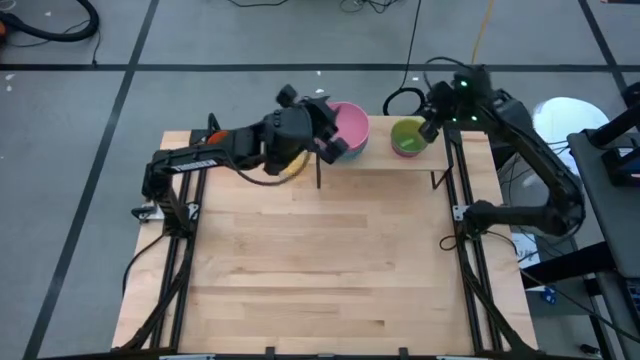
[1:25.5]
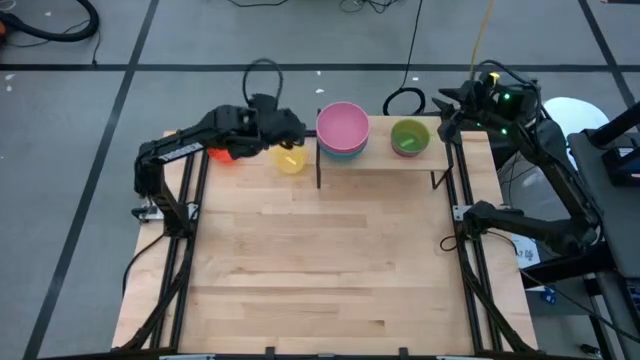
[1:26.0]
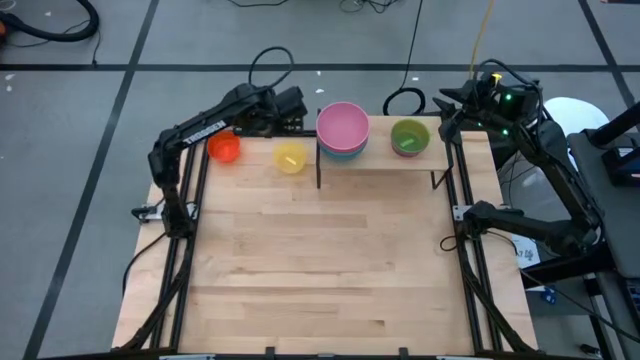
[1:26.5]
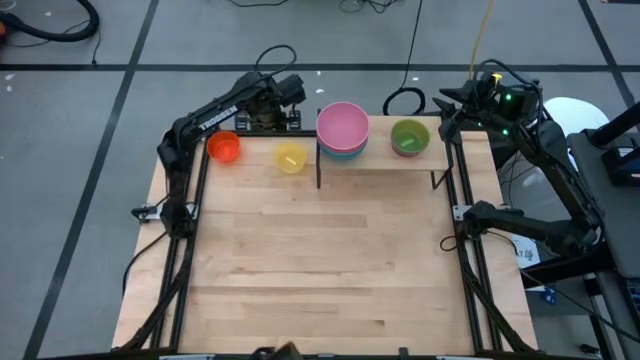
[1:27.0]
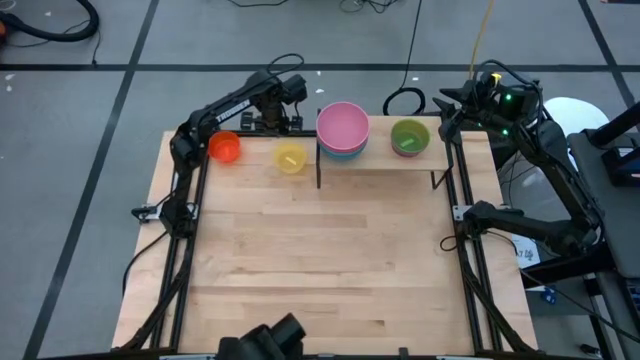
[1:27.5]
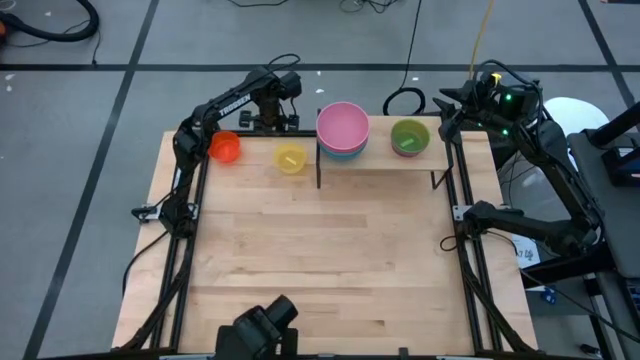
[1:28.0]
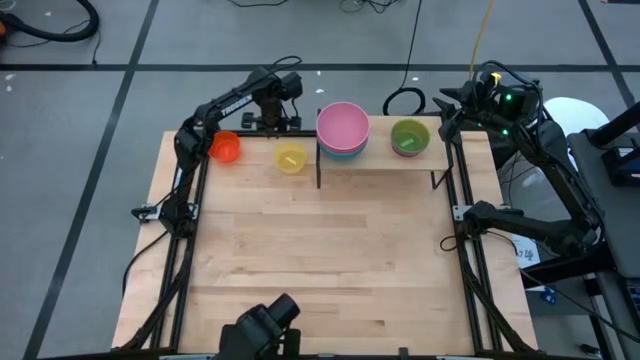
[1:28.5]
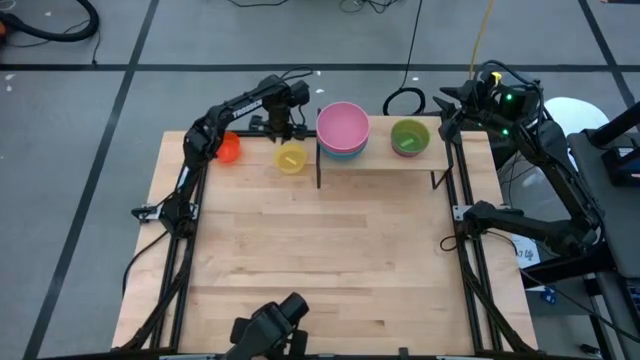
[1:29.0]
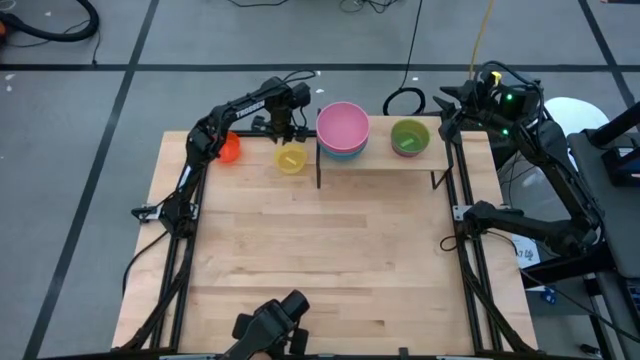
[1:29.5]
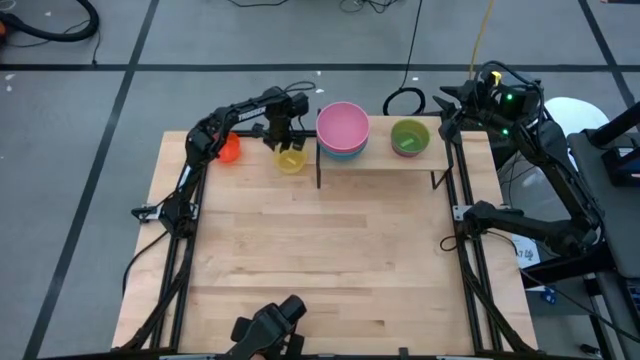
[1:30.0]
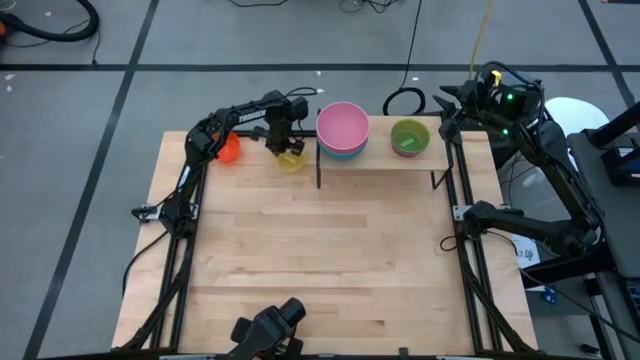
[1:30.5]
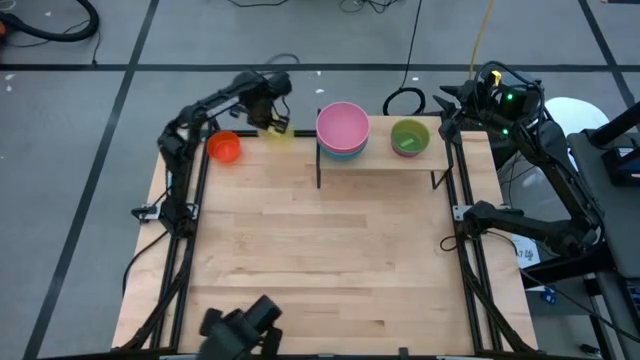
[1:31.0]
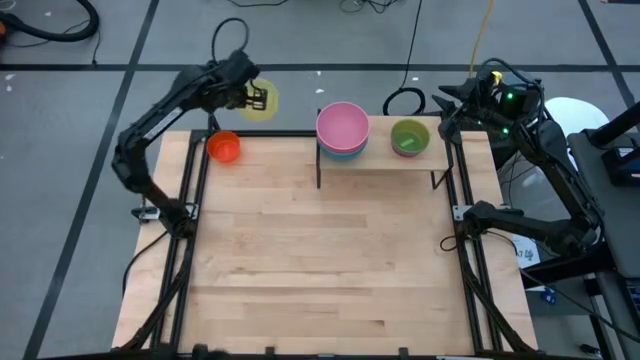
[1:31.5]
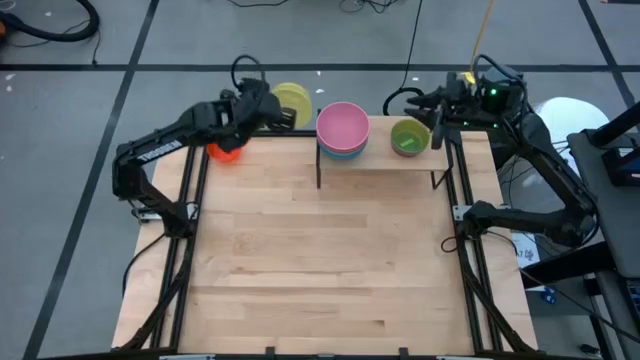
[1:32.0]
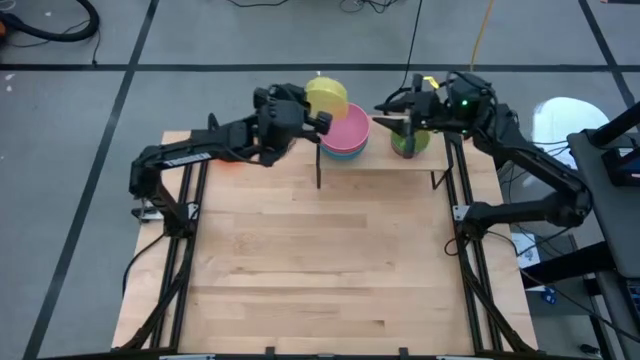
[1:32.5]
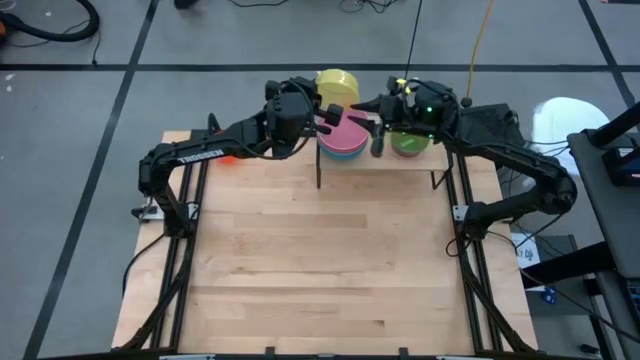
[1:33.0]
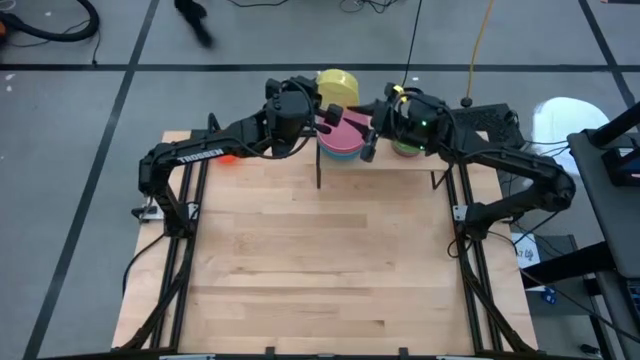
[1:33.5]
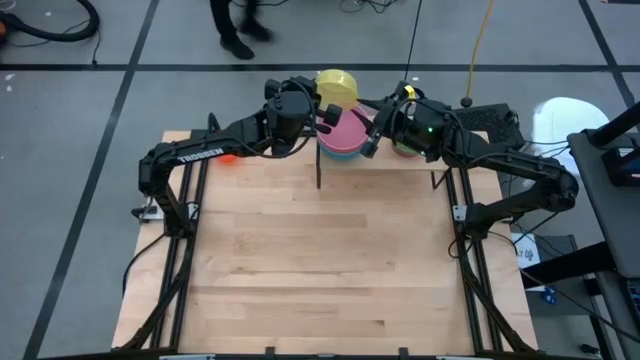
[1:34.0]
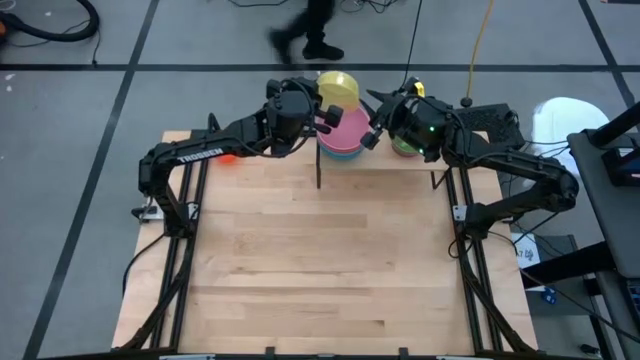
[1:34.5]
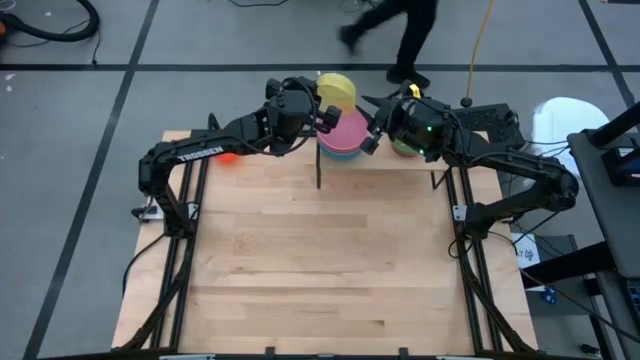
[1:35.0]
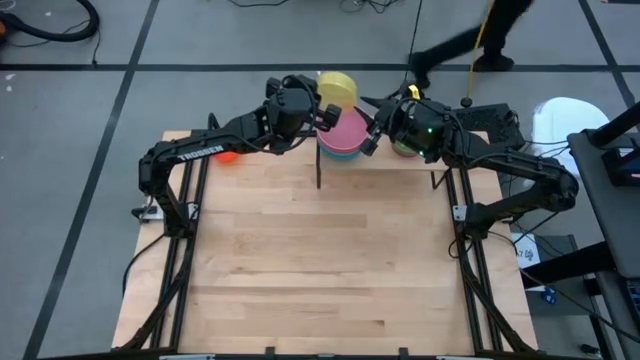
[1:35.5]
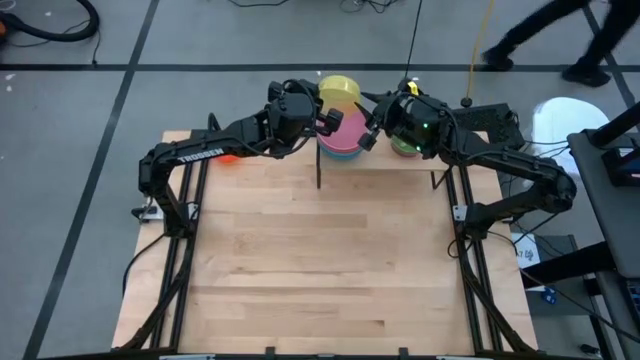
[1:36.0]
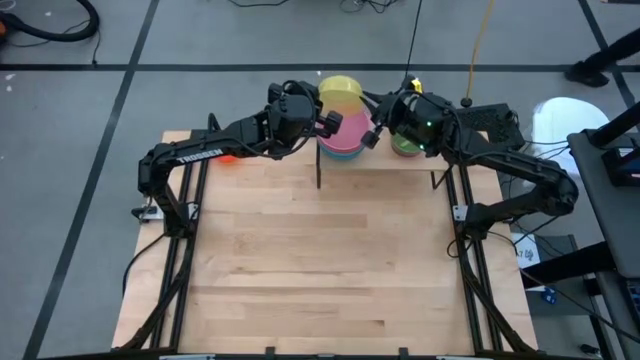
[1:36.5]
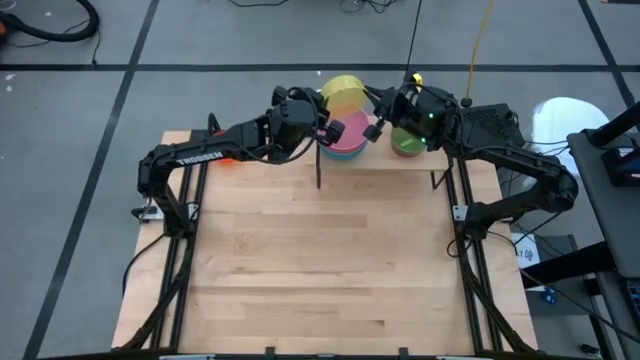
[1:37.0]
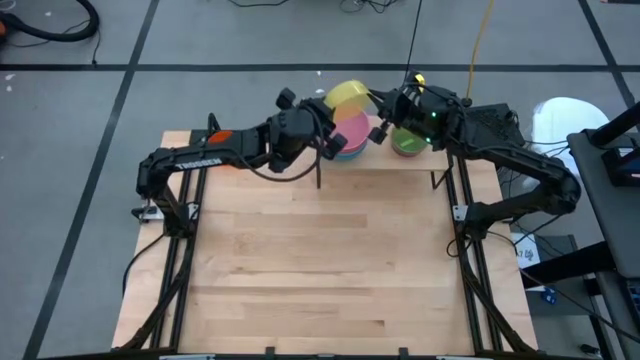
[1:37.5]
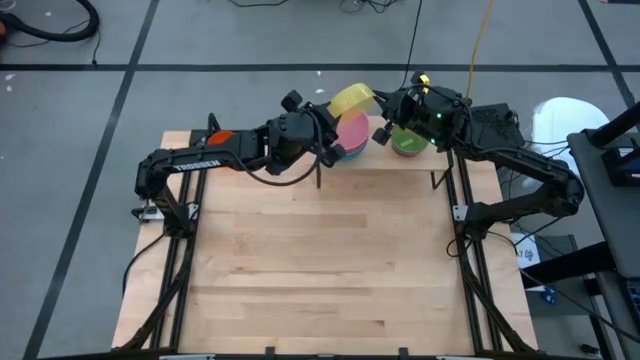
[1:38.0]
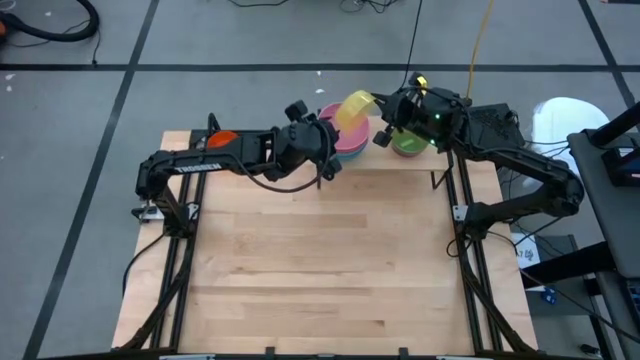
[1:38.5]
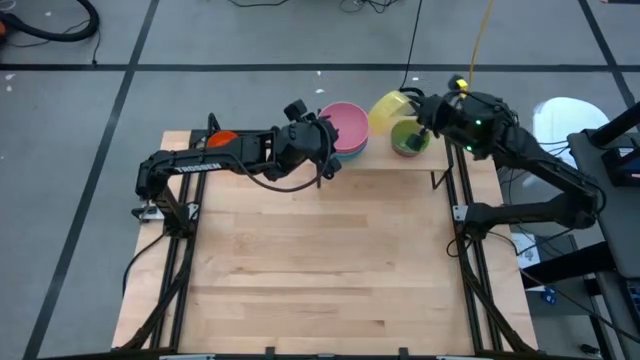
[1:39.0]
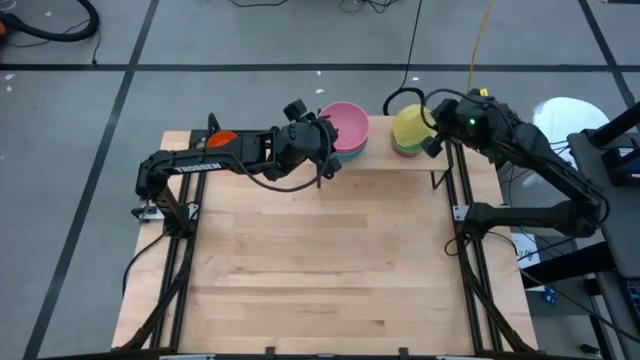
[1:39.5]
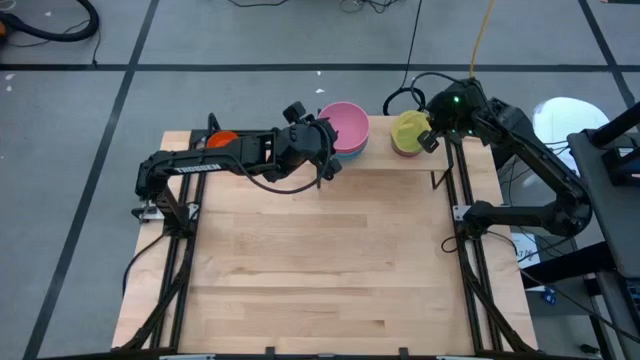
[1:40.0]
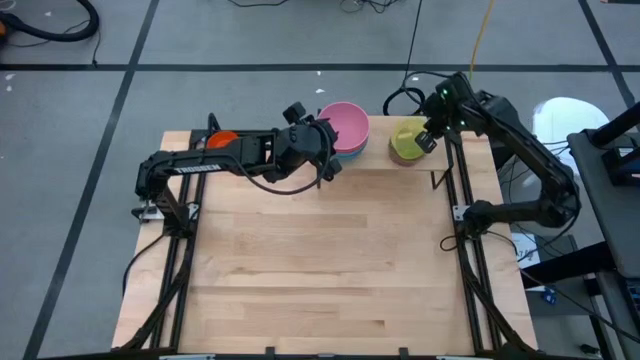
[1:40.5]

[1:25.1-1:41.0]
Task: Place and stack bowls onto a shelf
Stack the yellow bowl on top of the green bowl on the shelf

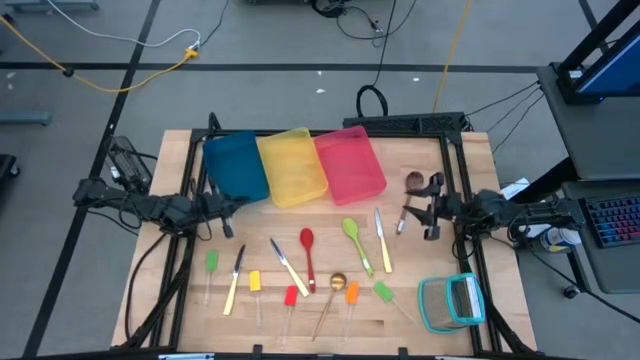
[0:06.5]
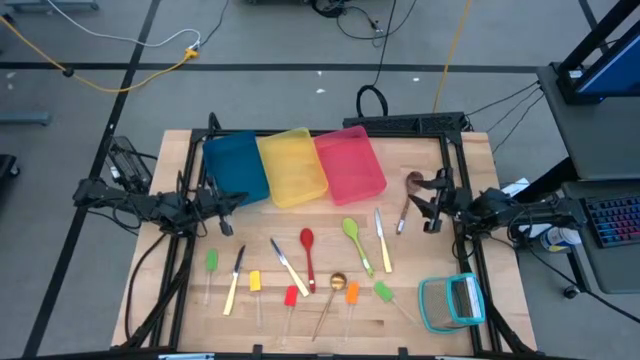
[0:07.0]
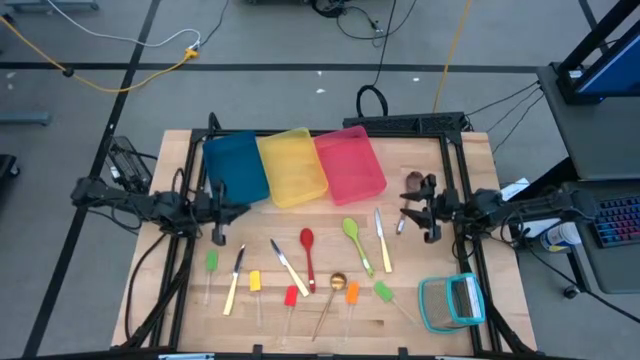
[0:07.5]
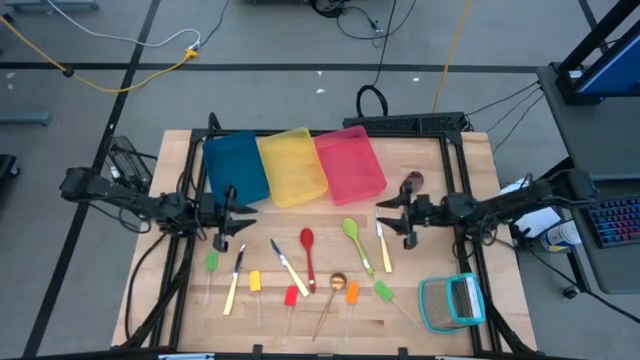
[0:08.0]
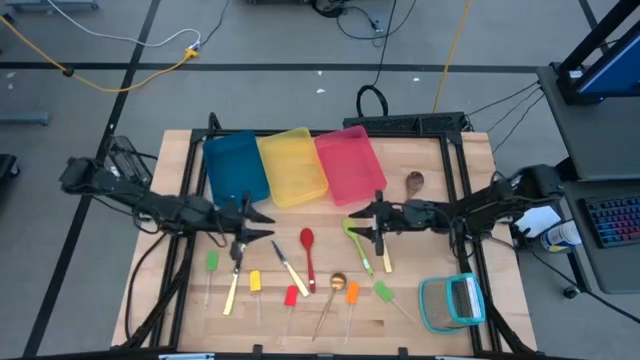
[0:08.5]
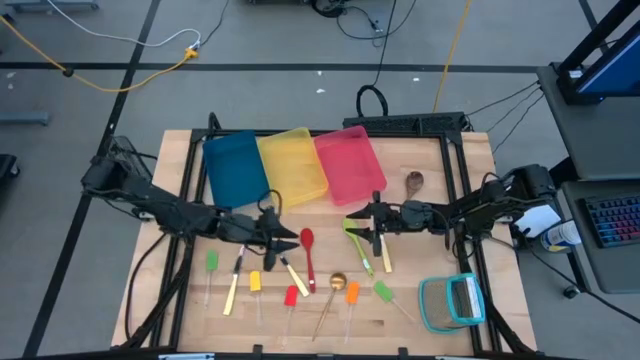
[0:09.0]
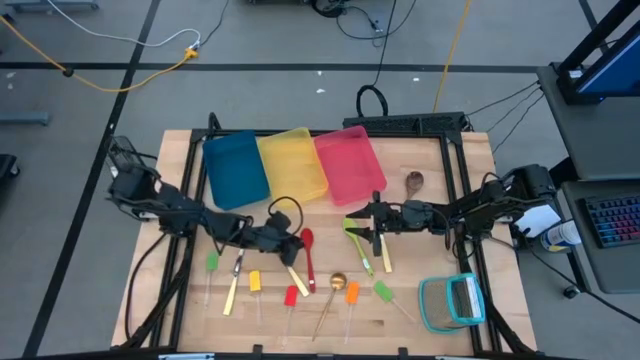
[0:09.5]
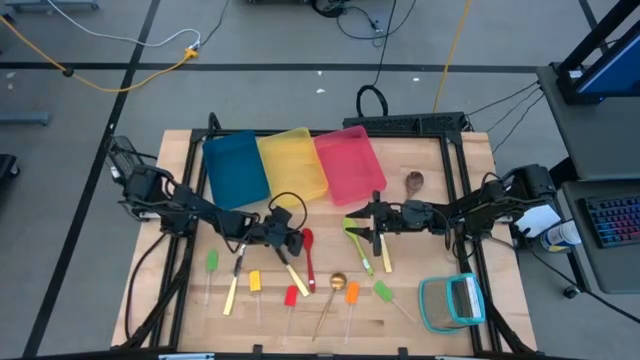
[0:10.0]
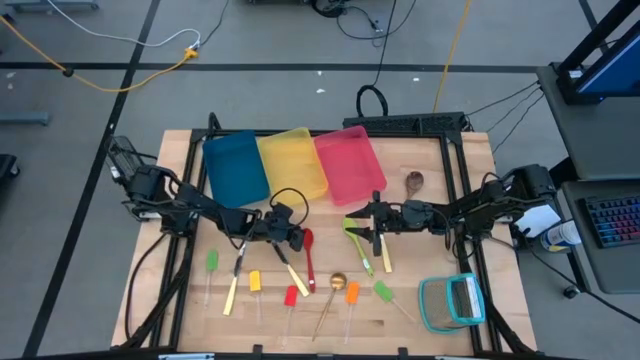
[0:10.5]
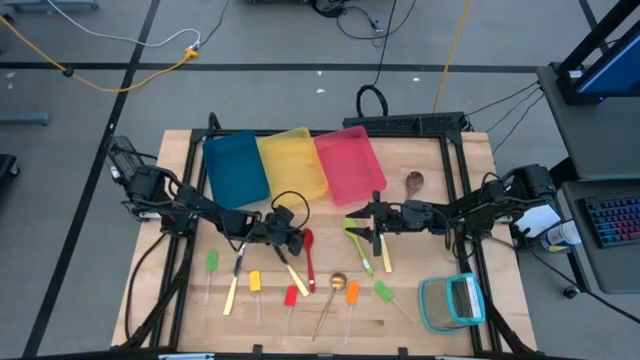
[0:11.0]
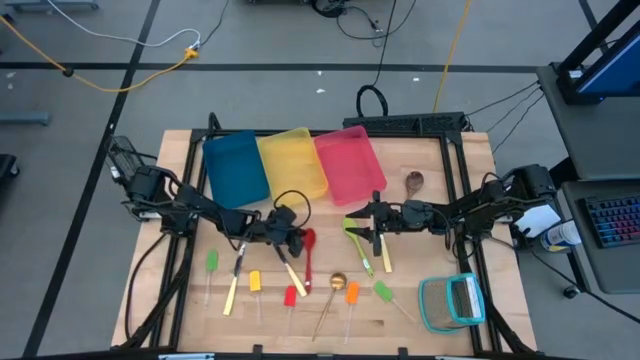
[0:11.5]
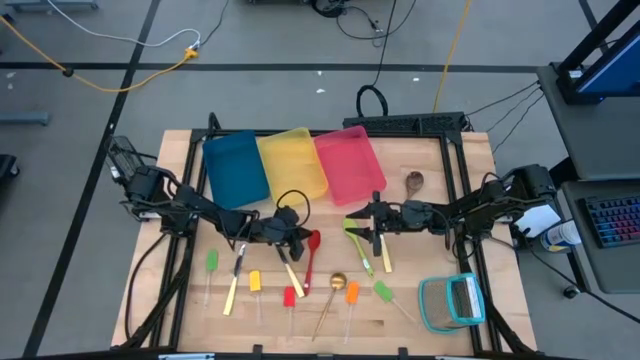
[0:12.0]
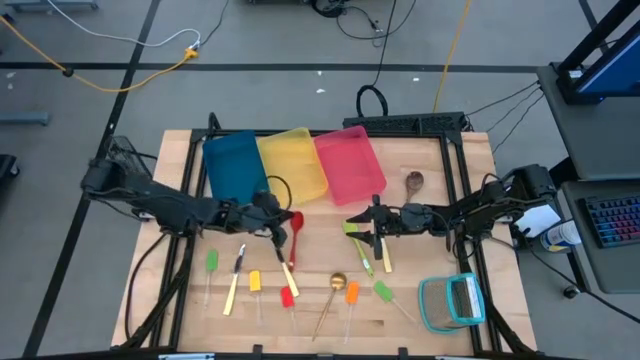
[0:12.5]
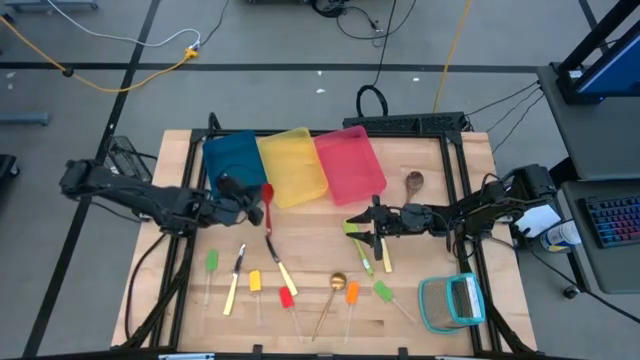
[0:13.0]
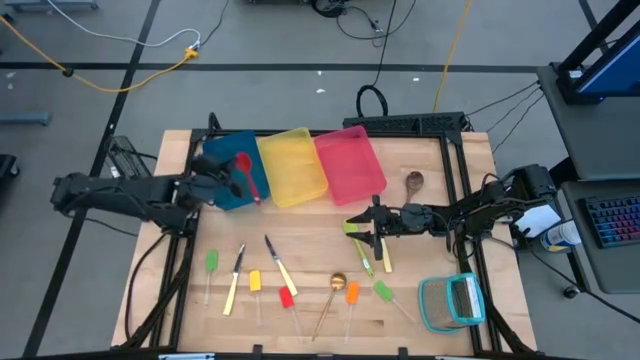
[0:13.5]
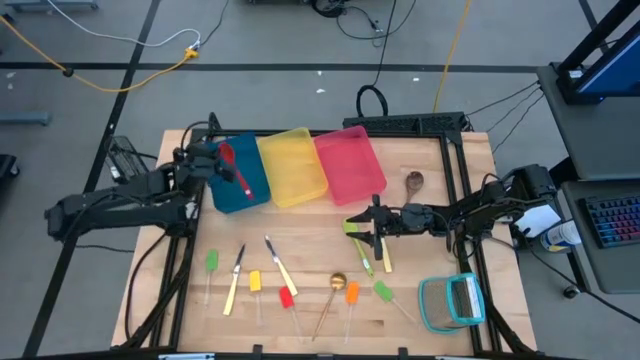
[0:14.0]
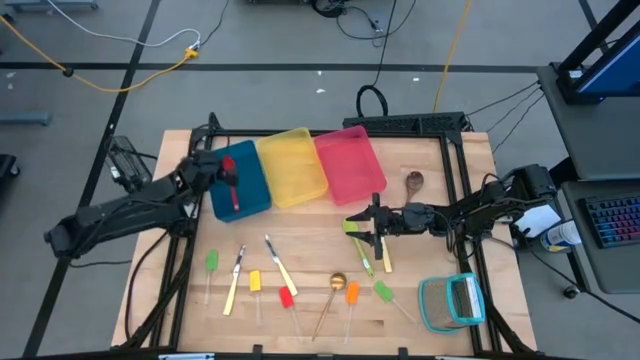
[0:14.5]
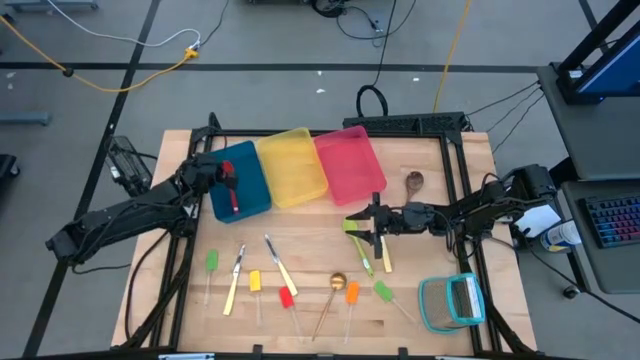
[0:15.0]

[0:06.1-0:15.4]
Task: Pick & Place Kitchen Items
Put the red serving spoon into the blue bin
